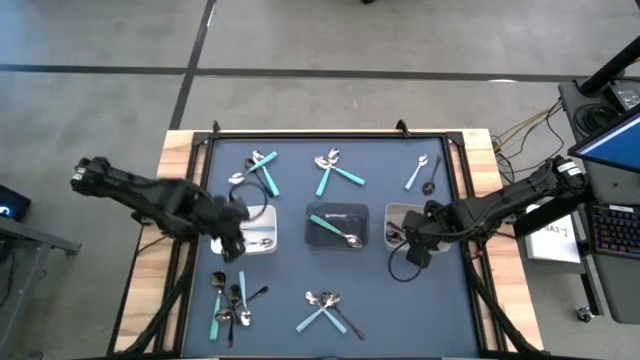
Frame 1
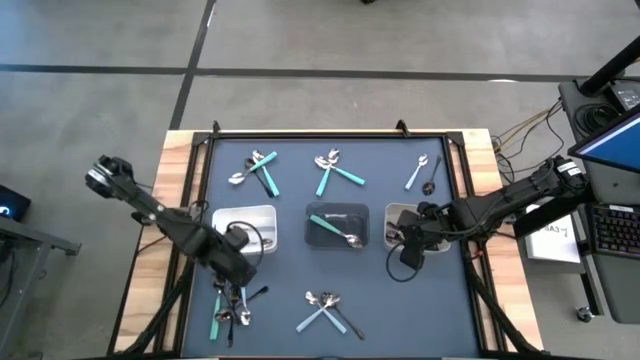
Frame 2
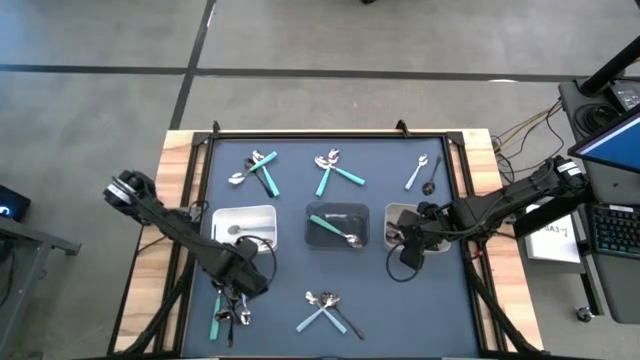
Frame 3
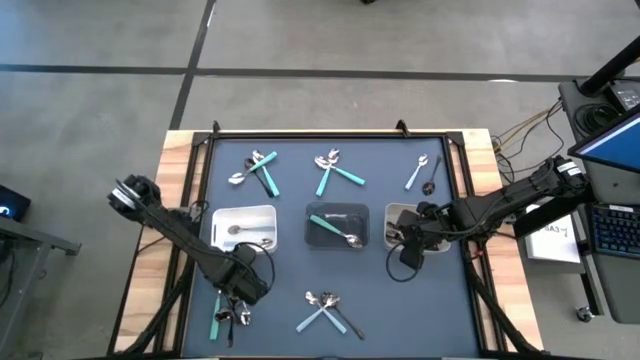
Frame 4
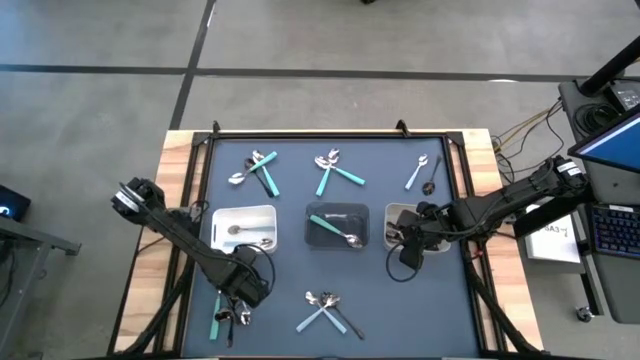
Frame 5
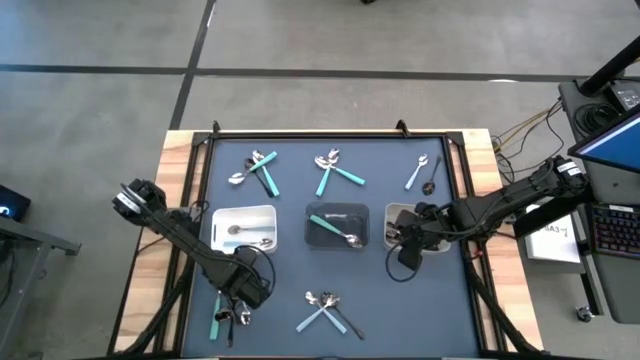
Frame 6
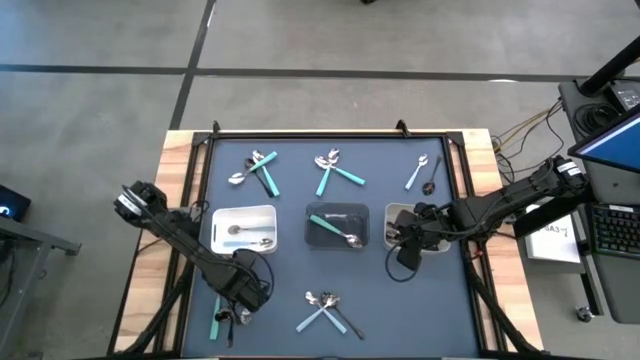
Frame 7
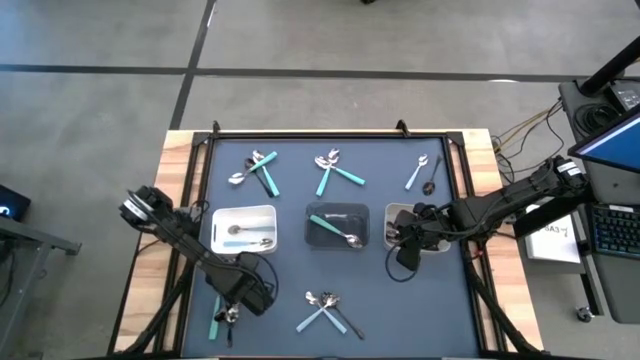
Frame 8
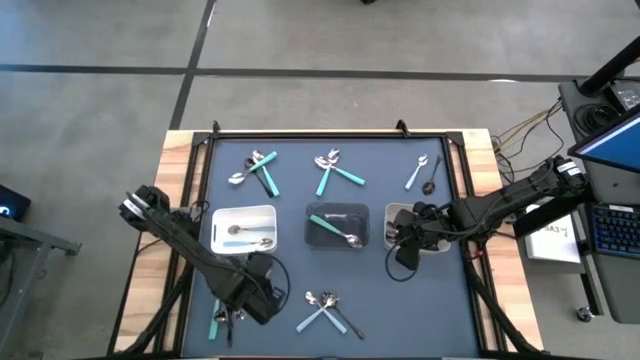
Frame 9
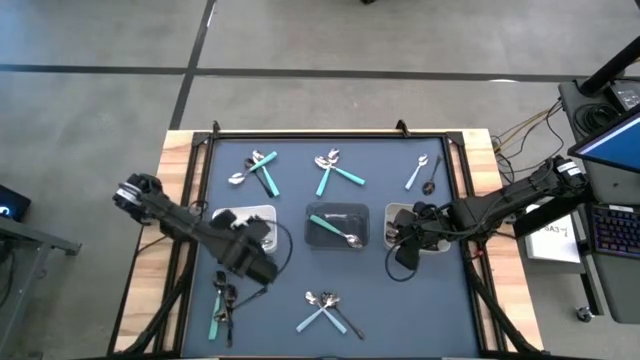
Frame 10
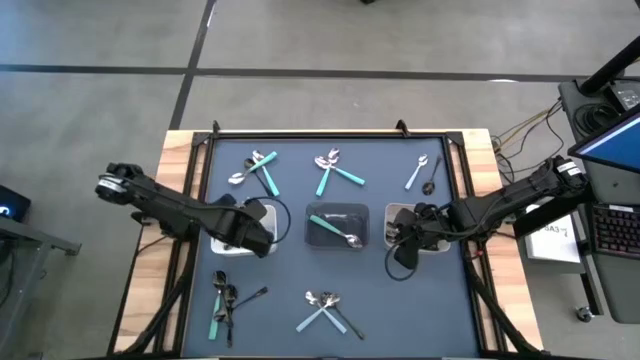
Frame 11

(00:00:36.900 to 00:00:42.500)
Task: Sort silverware by color (type)
Put the light blue spoon into the white bin

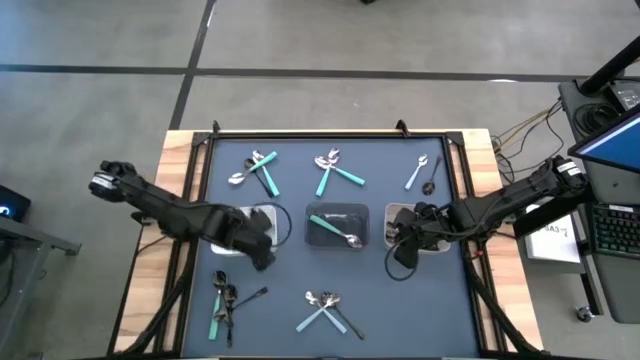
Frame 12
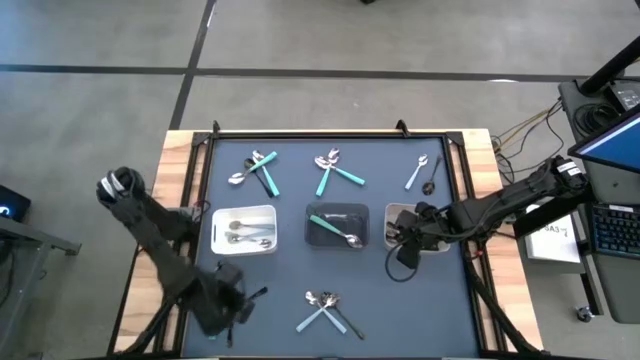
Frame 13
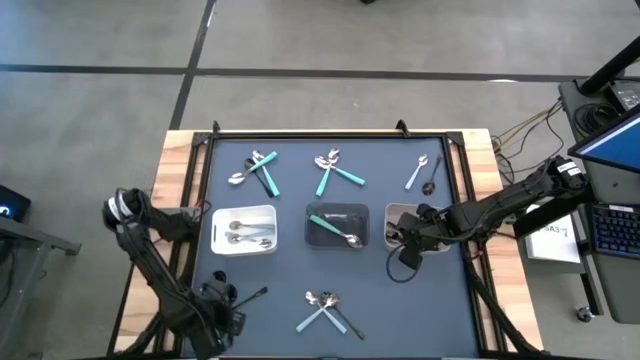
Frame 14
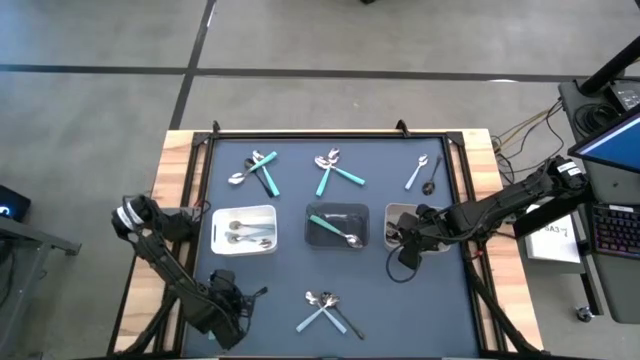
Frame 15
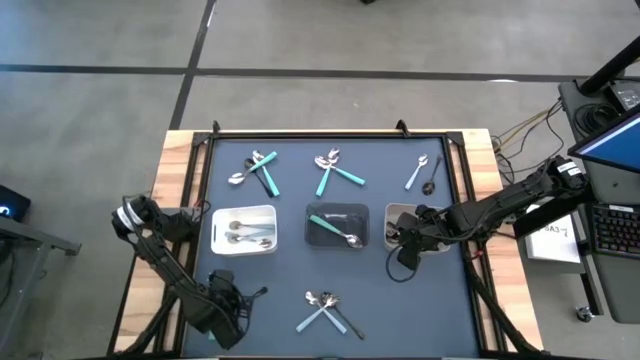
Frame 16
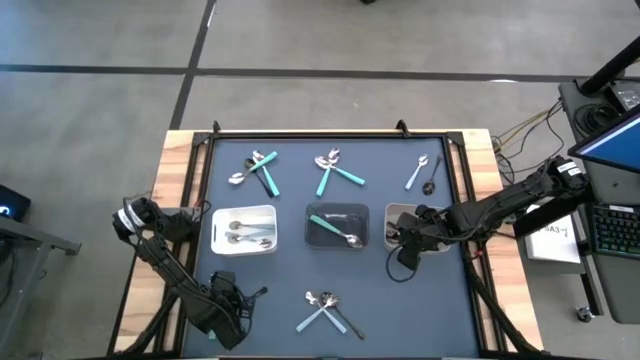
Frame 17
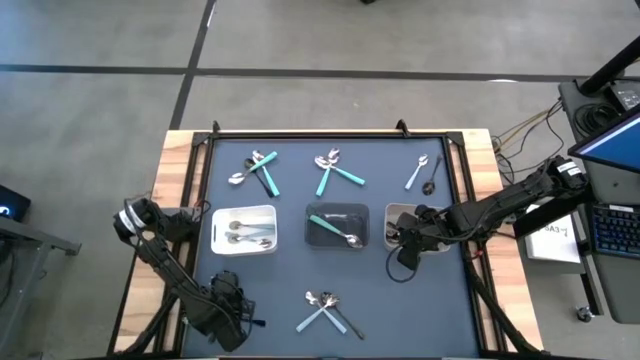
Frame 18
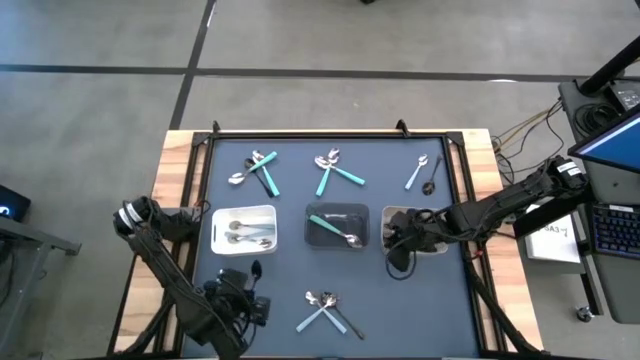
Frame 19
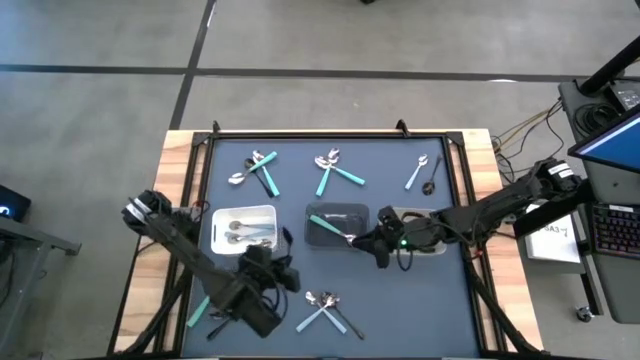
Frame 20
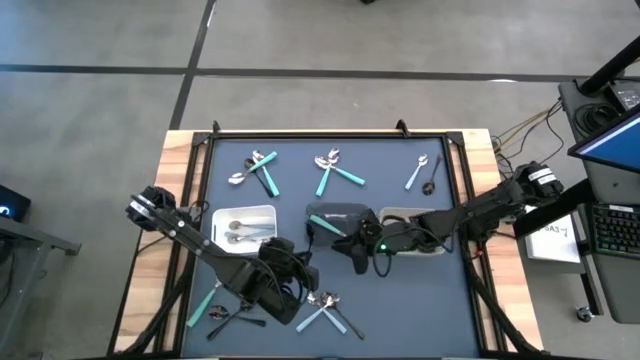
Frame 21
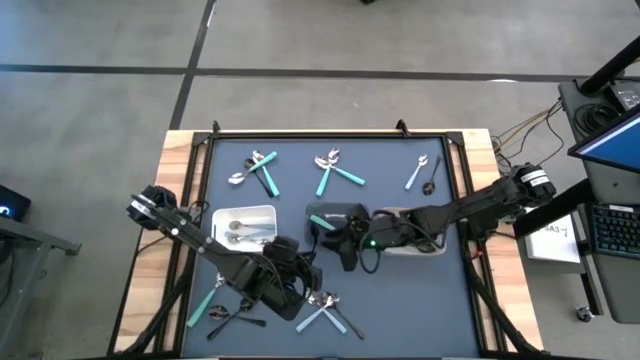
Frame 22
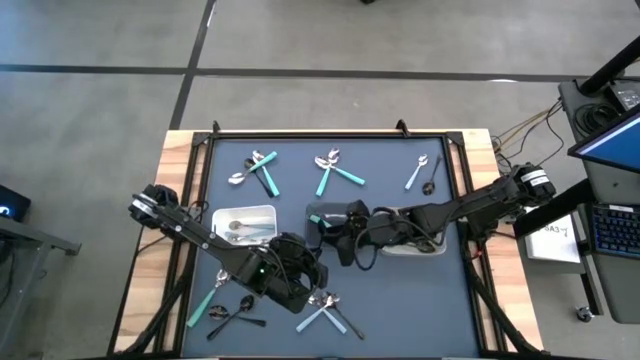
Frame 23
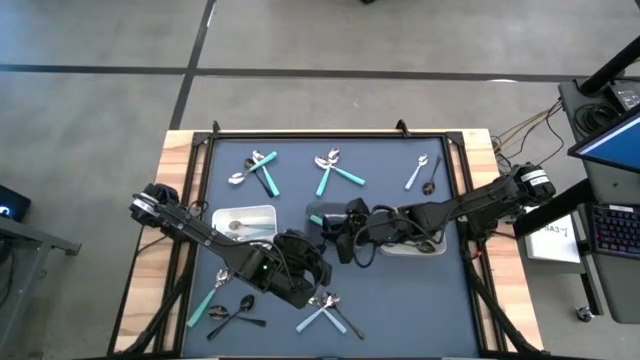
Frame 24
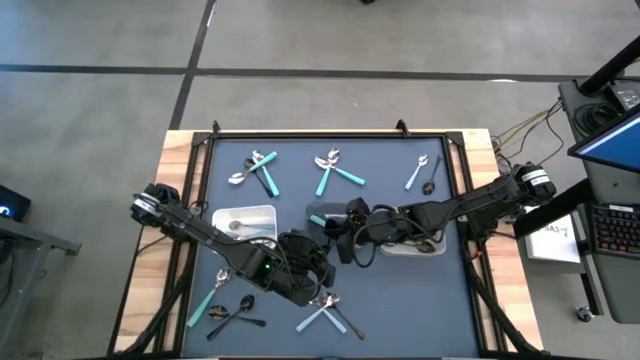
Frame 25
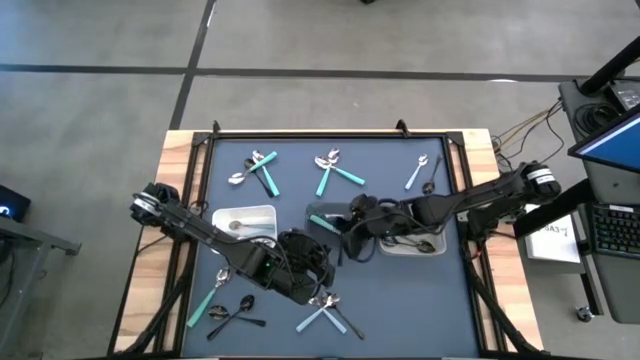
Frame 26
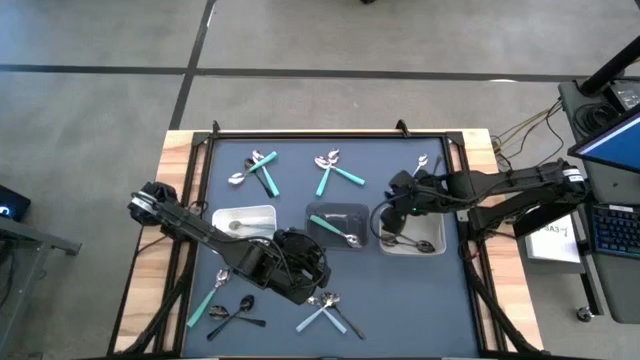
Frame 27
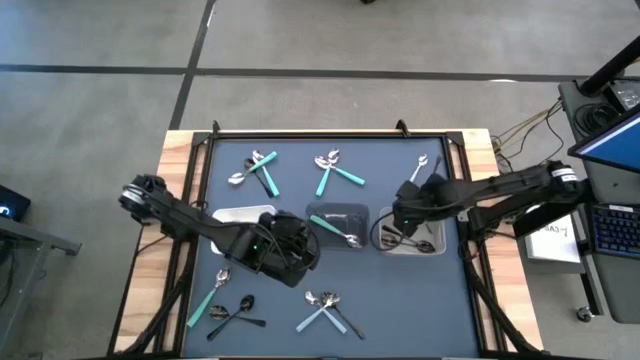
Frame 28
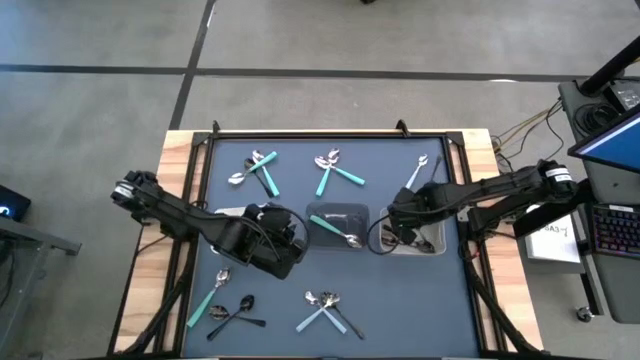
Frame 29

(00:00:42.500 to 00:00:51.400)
Put the black spoon into the gray bin

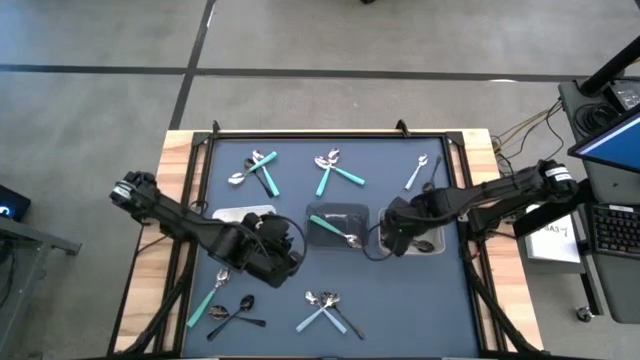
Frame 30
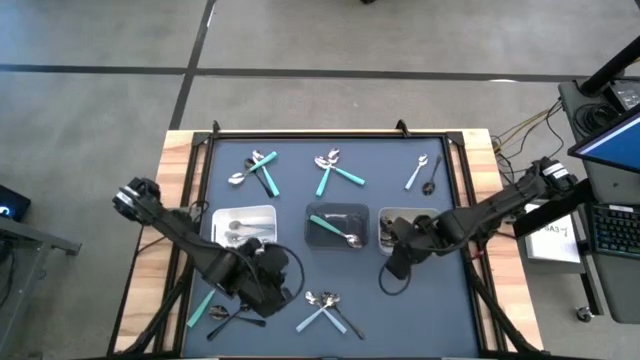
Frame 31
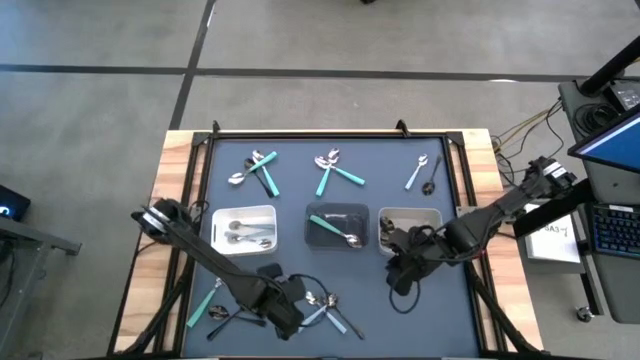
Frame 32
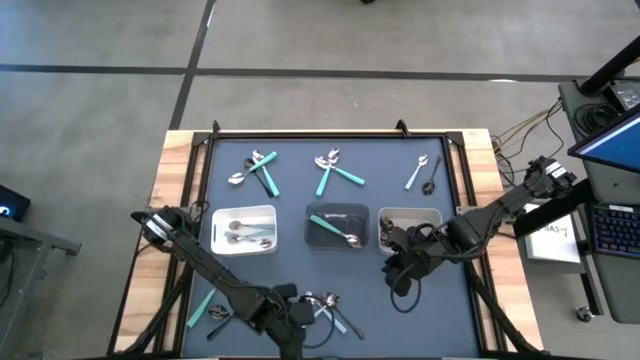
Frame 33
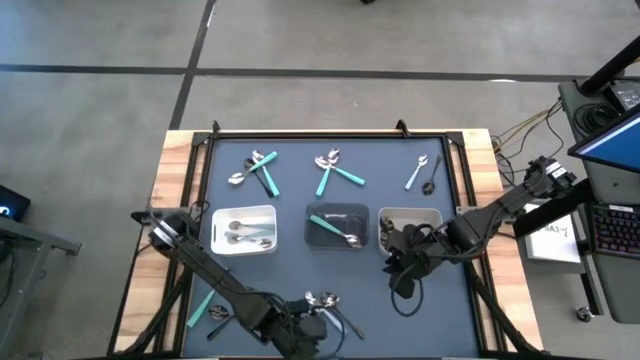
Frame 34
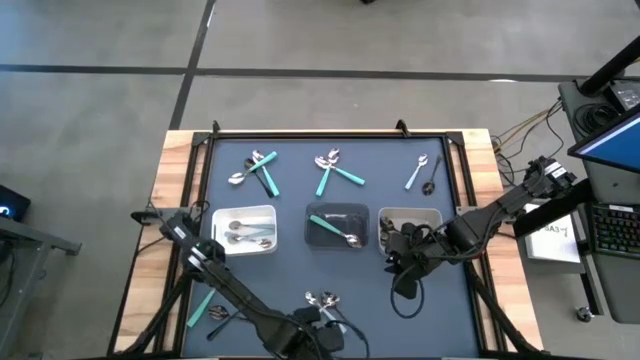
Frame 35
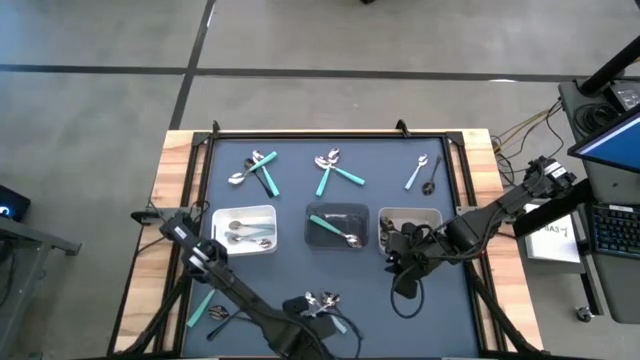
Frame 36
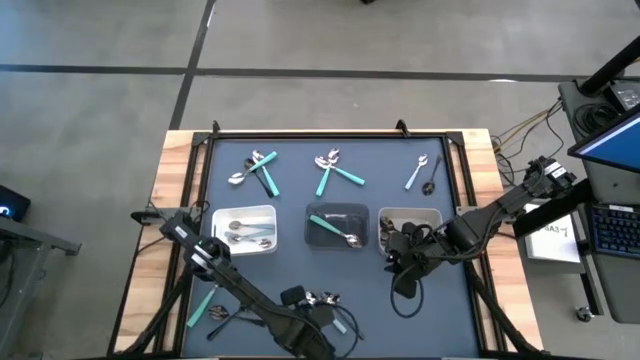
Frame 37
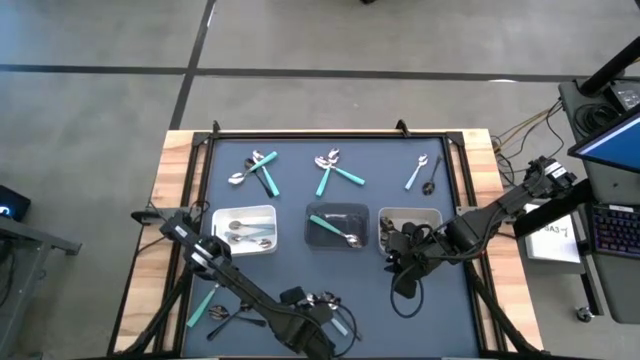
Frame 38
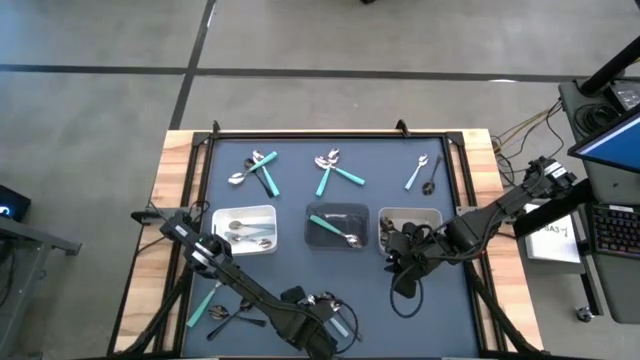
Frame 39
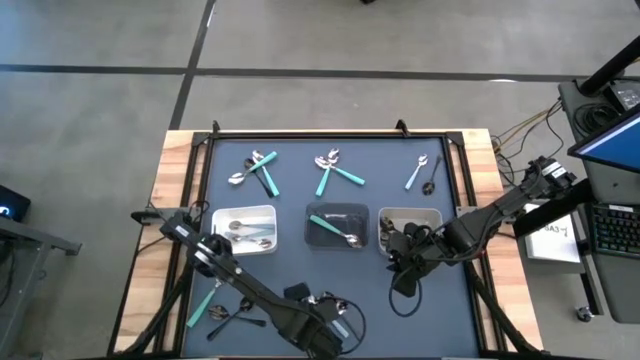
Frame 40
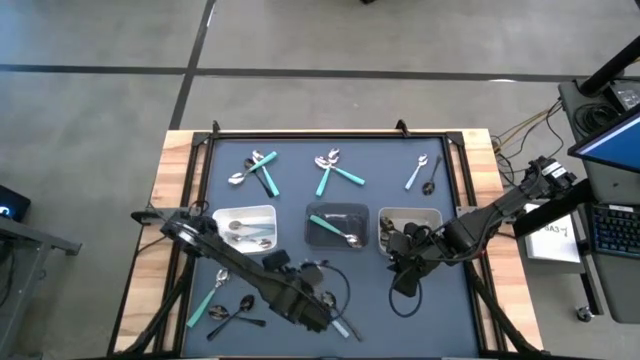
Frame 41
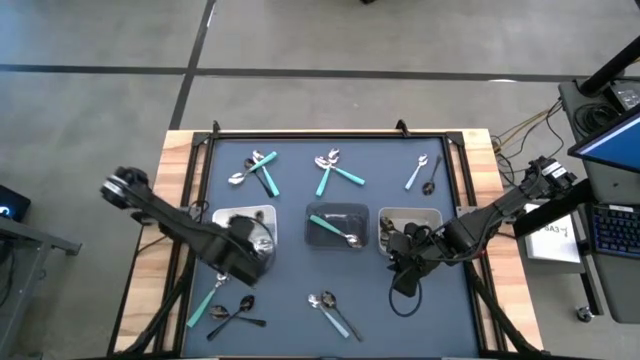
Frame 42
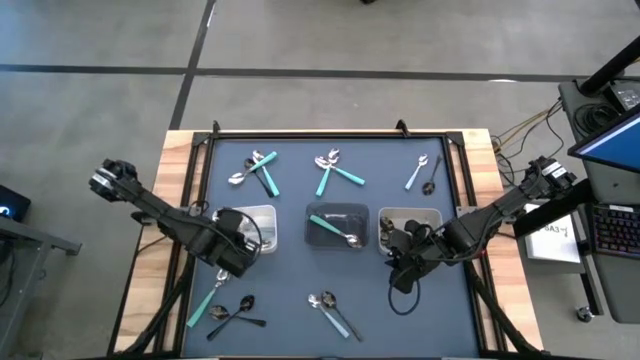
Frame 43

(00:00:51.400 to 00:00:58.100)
Put the light blue spoon into the white bin
